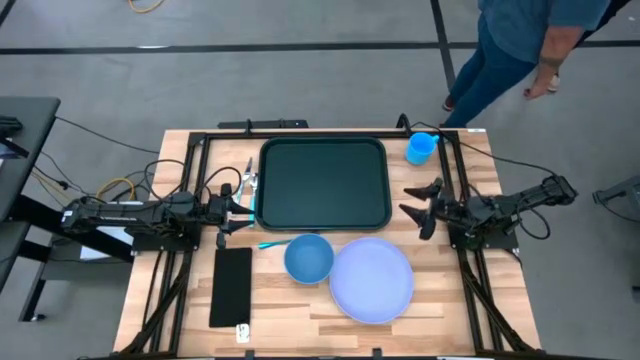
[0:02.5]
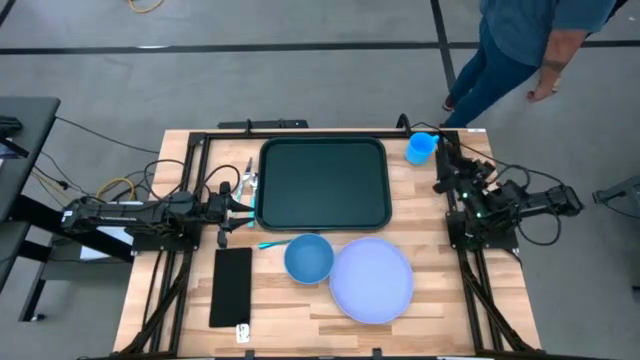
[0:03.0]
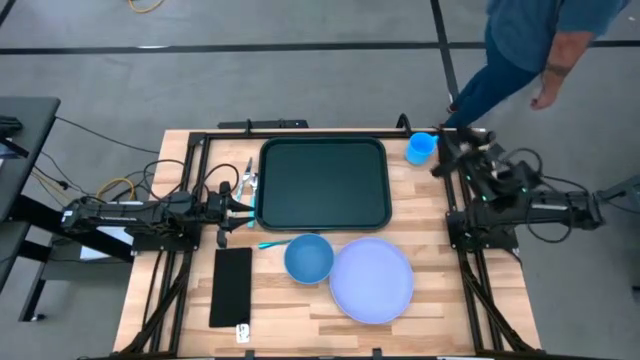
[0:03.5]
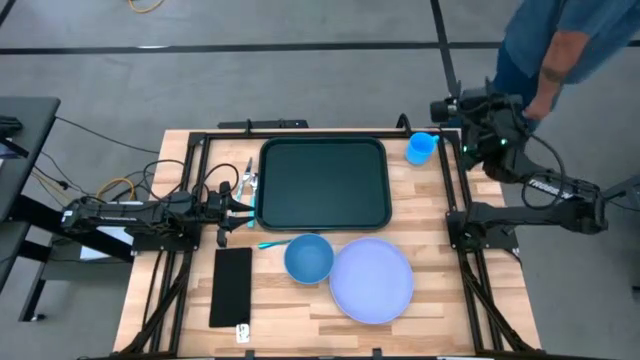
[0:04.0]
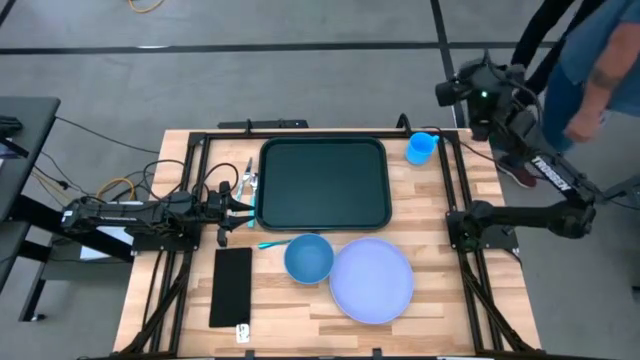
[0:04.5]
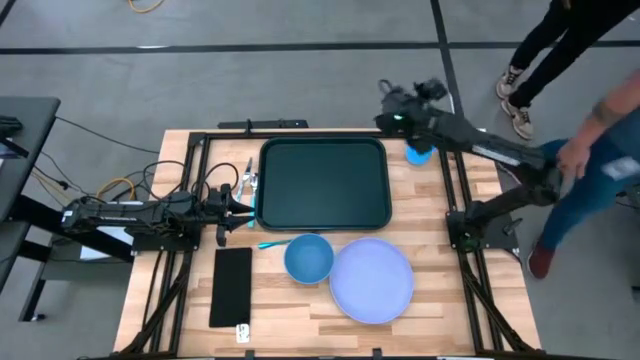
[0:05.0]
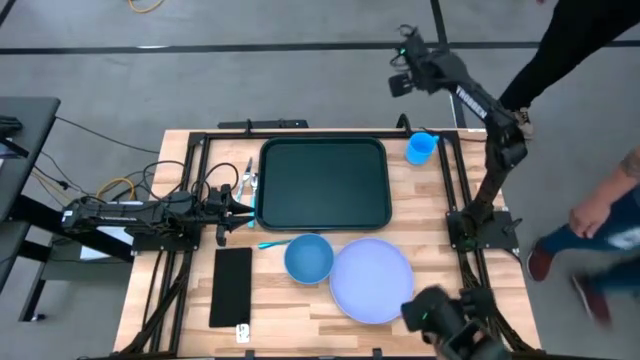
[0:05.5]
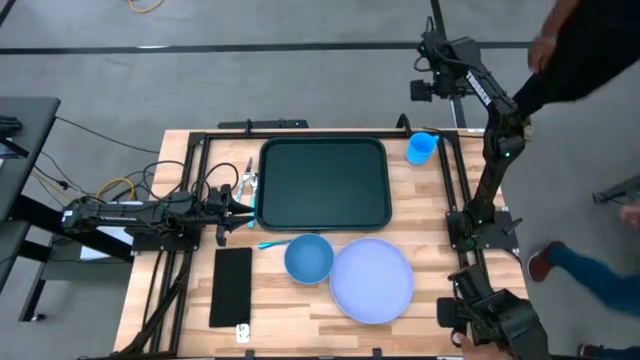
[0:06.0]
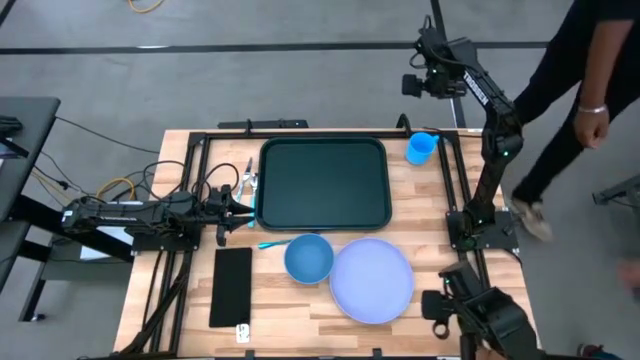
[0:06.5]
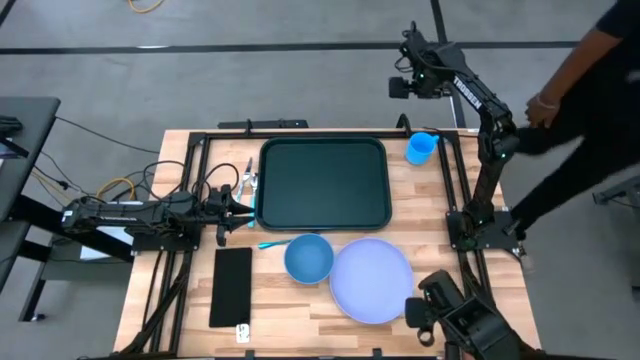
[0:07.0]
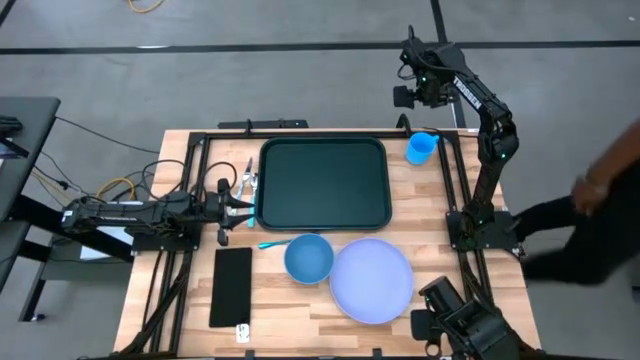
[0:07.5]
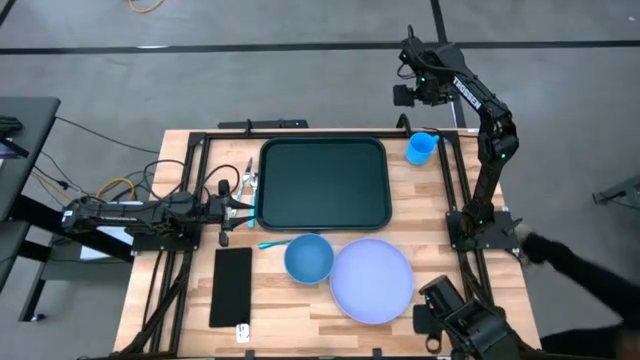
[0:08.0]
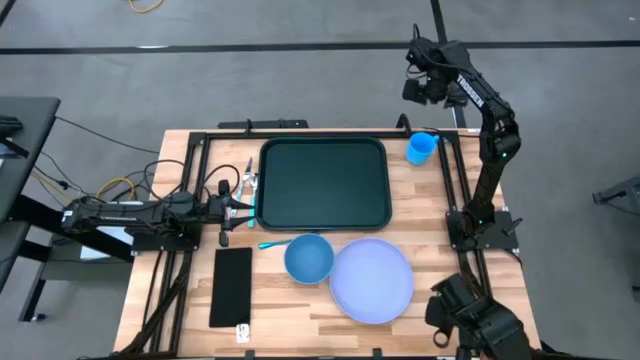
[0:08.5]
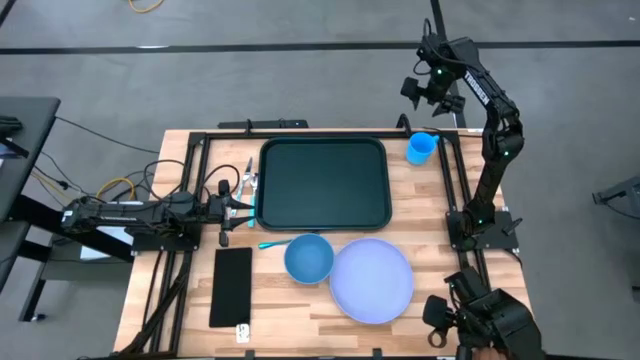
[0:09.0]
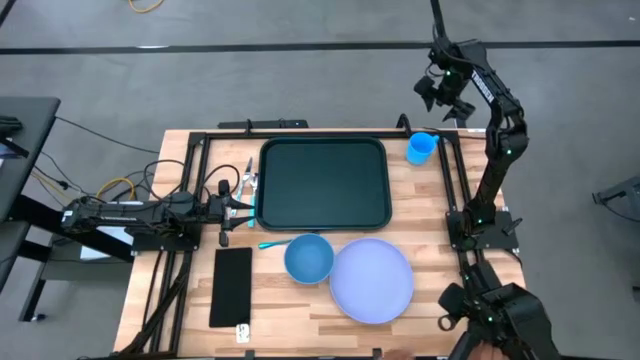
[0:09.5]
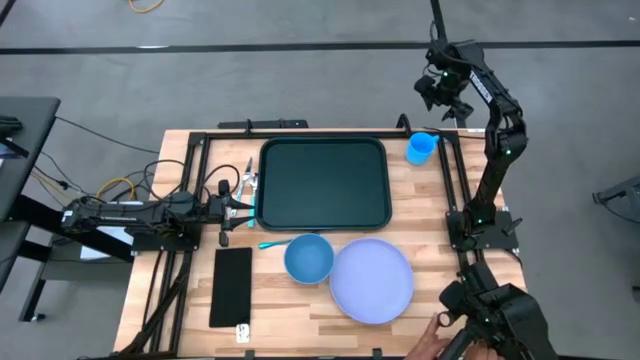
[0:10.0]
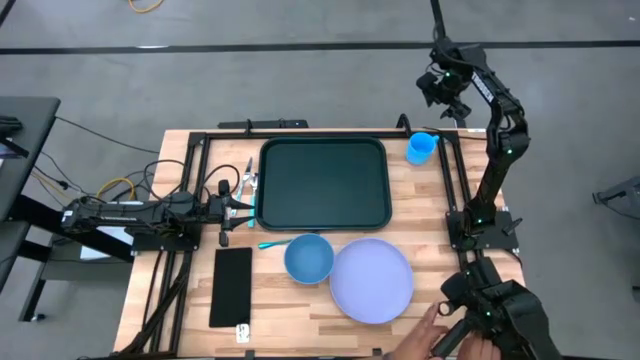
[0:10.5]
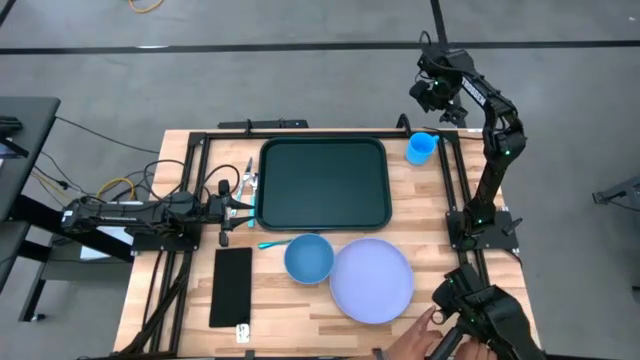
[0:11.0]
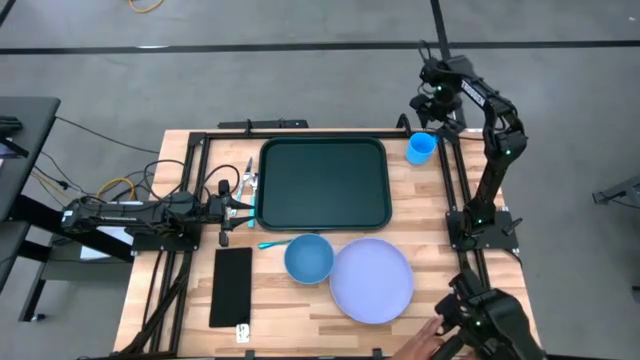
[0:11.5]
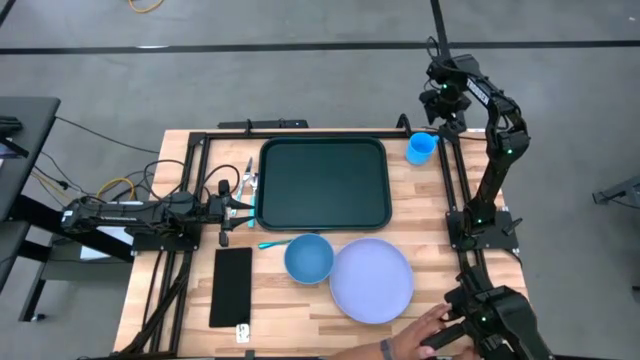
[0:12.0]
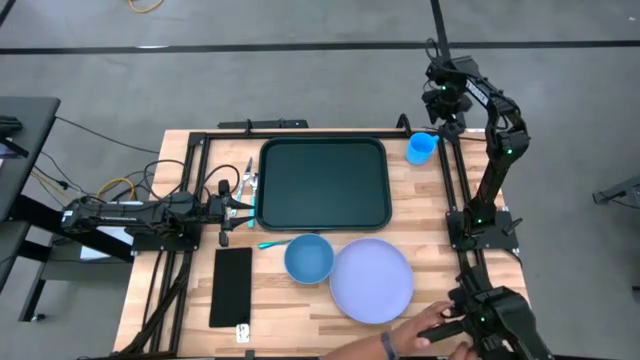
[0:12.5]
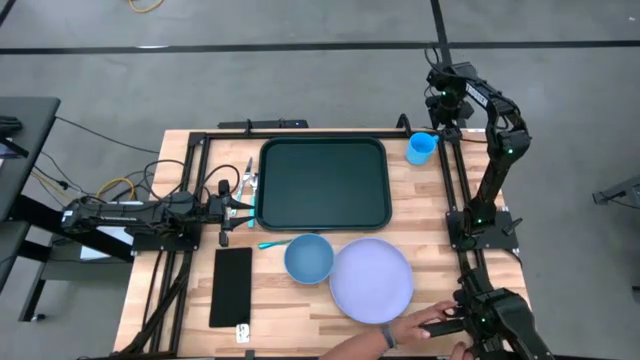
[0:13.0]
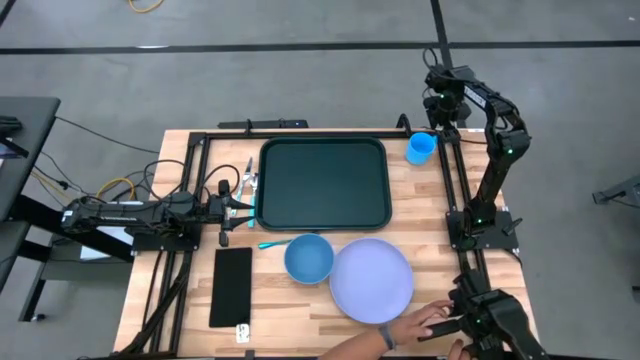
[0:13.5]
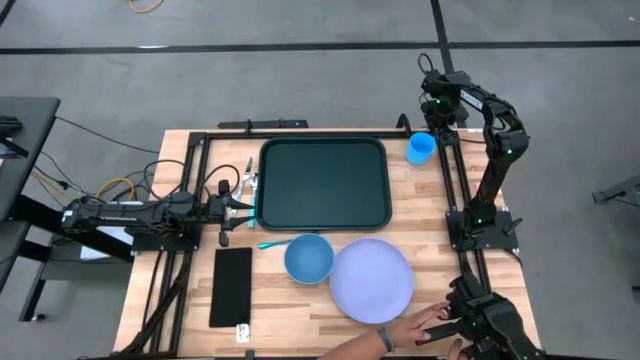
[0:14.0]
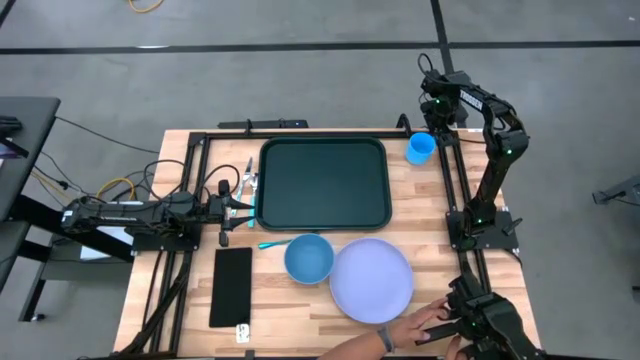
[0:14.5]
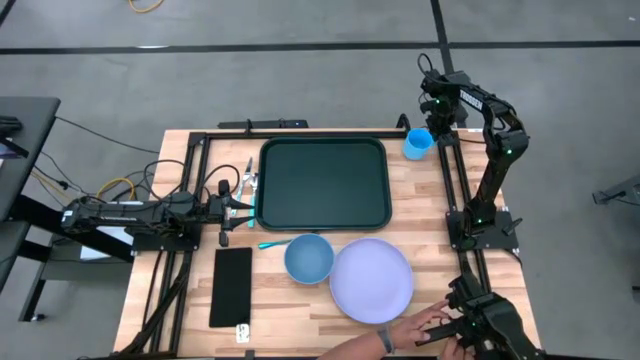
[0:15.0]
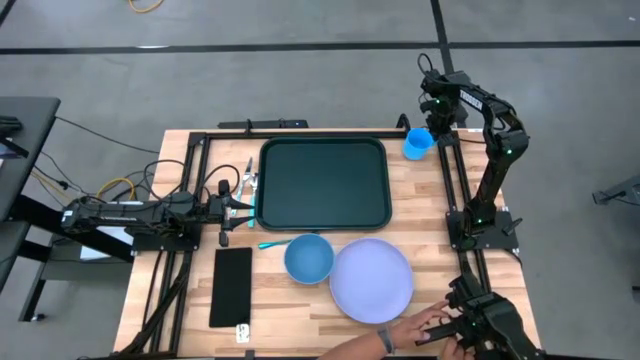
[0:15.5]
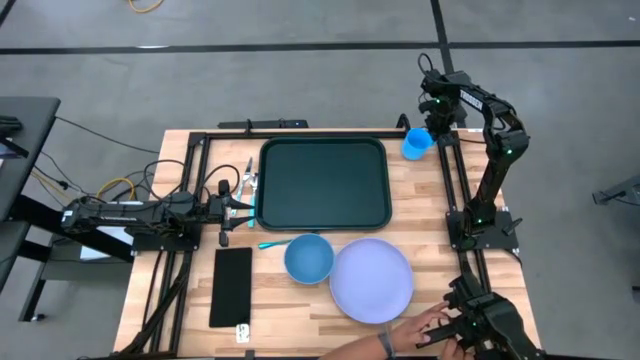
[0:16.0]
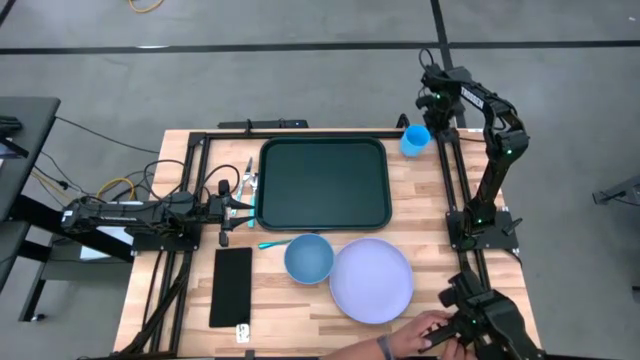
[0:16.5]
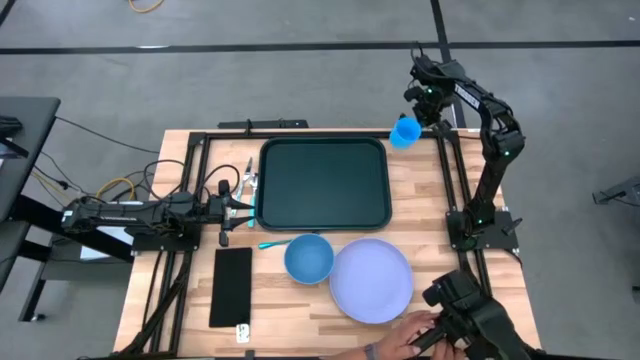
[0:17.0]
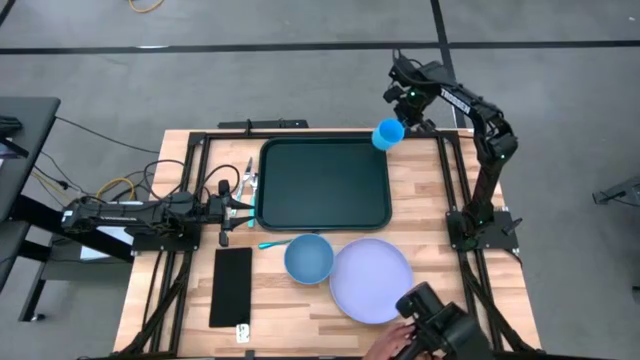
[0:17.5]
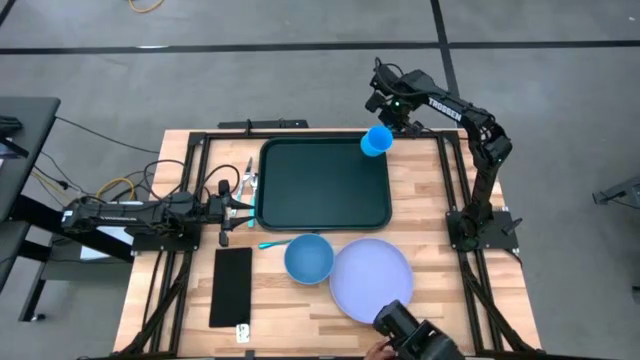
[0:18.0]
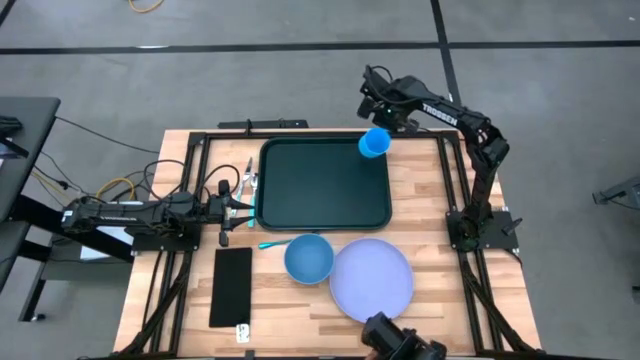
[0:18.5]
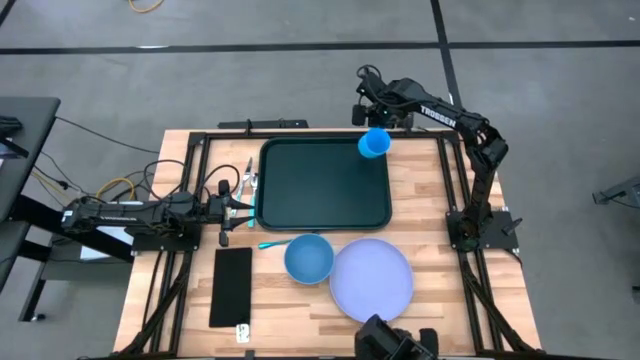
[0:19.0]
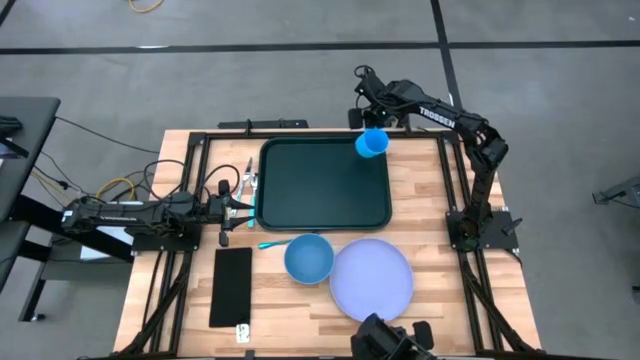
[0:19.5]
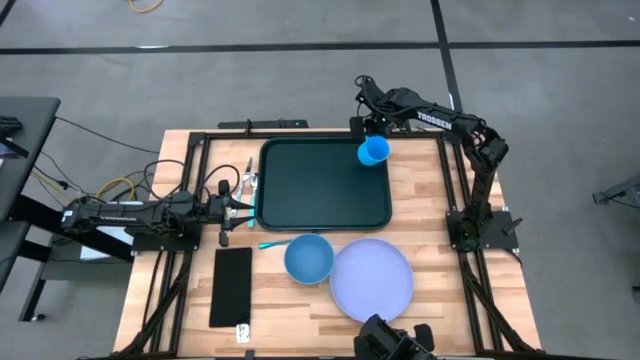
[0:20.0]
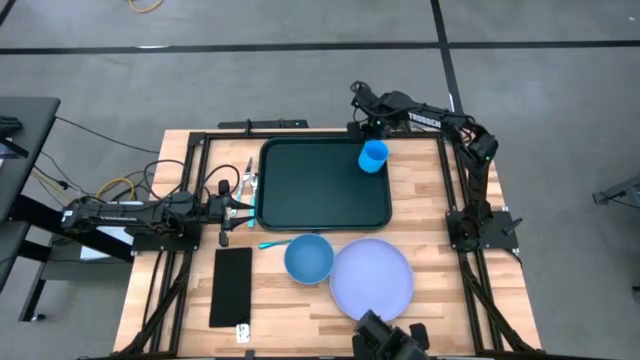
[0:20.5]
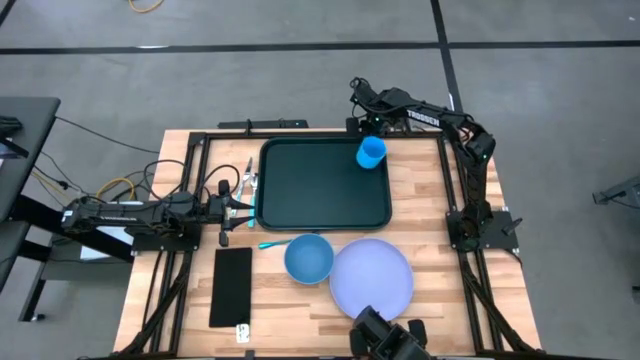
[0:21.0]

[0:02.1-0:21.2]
Task: Set up tray
Put the light blue mug on the black serving tray
